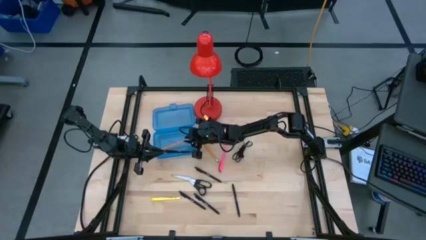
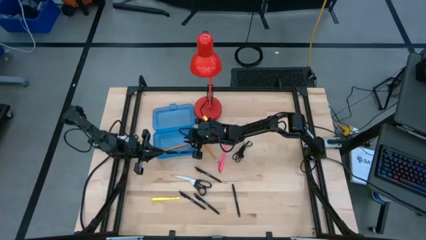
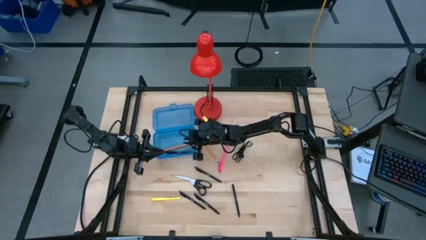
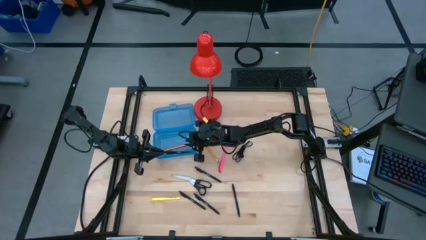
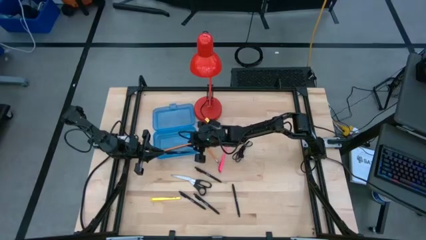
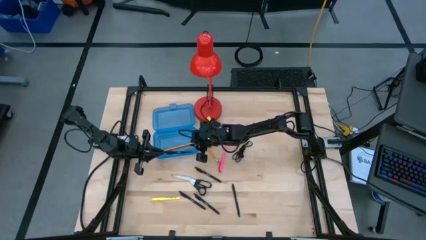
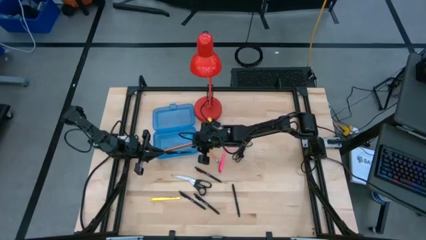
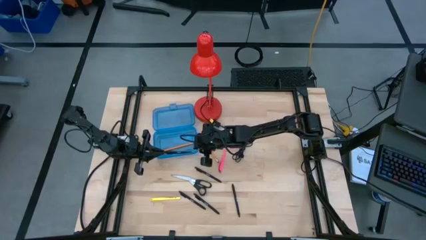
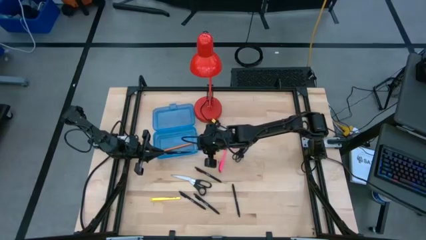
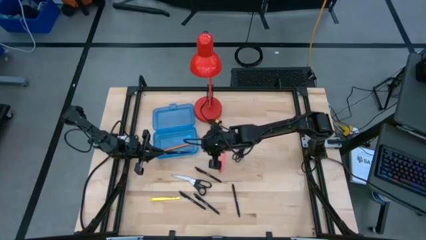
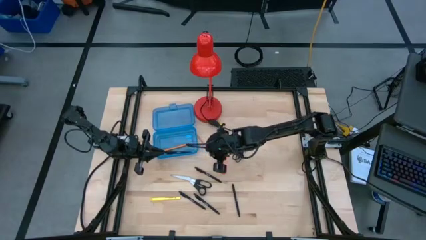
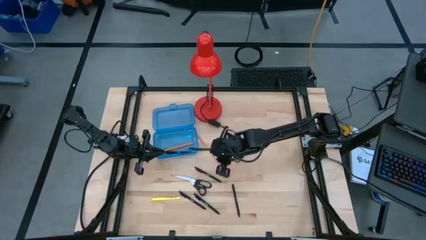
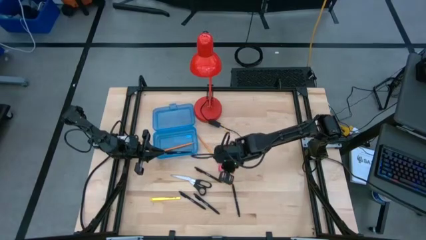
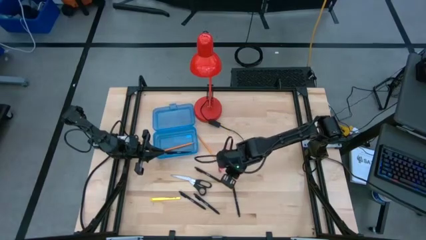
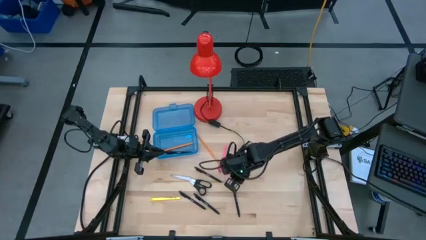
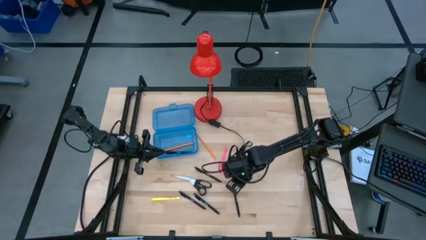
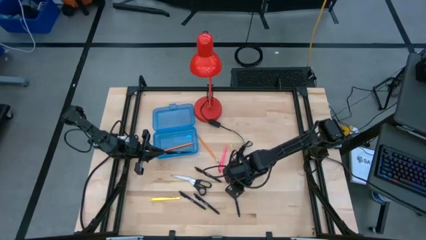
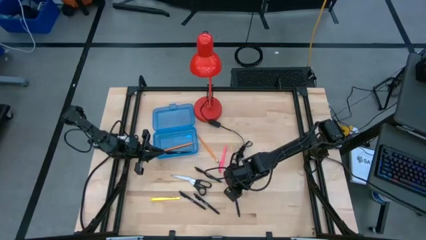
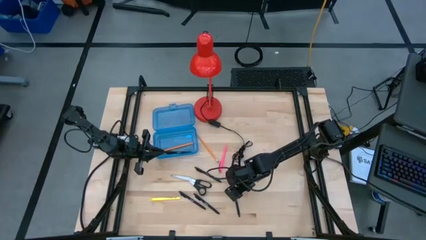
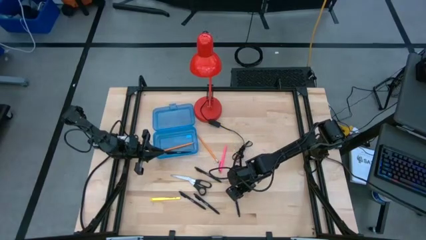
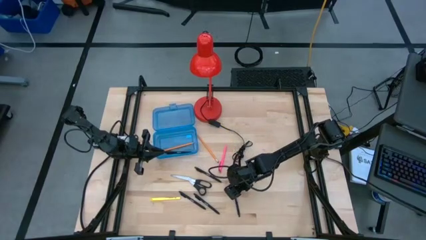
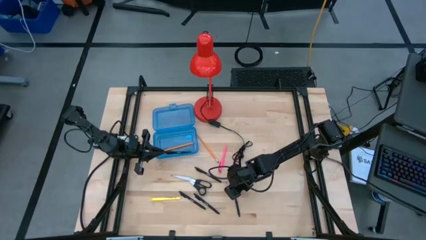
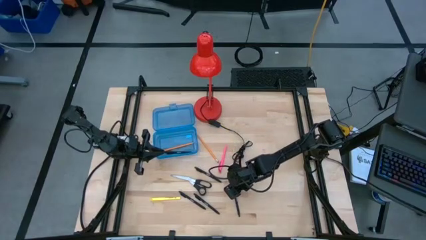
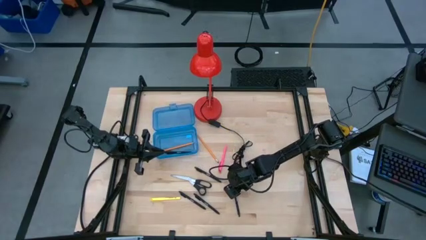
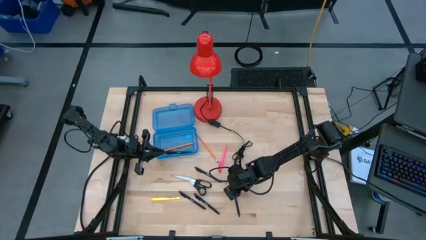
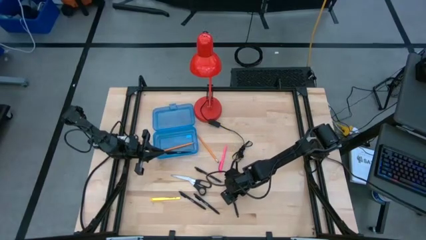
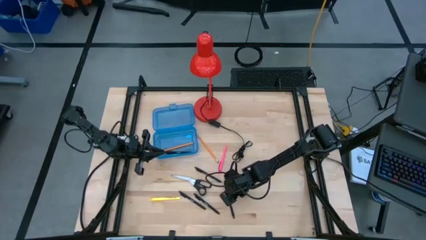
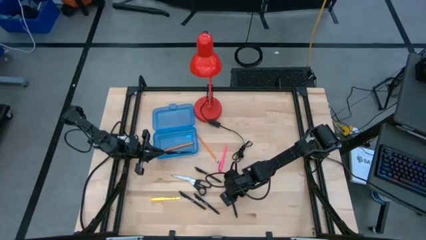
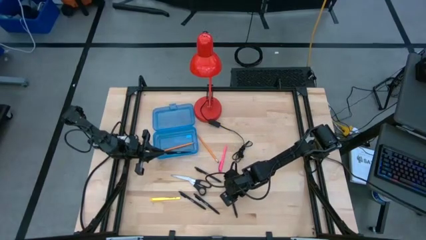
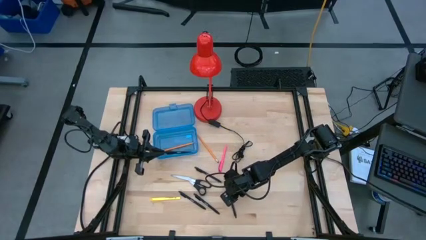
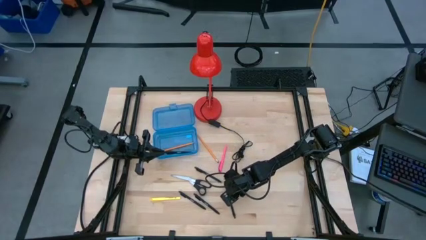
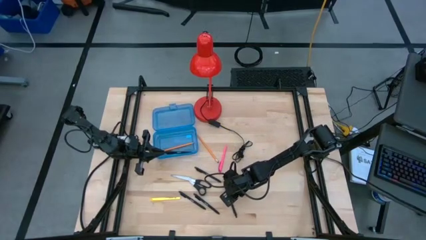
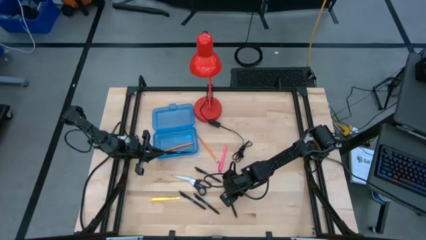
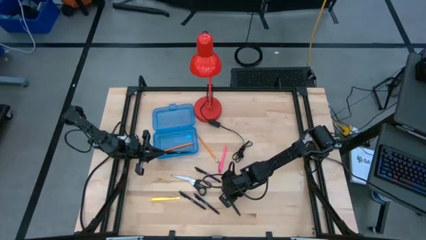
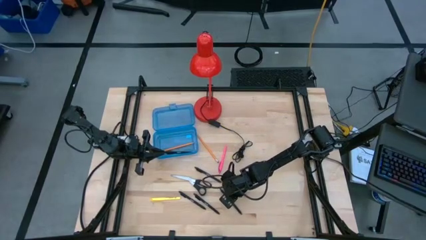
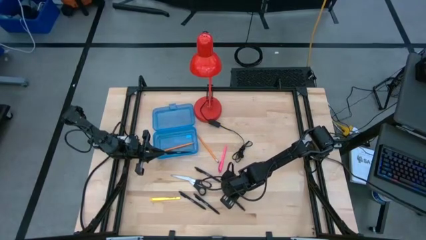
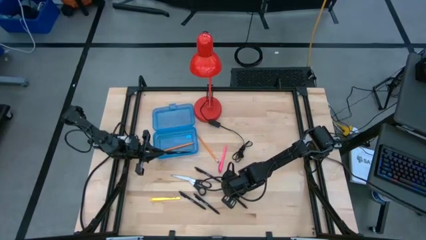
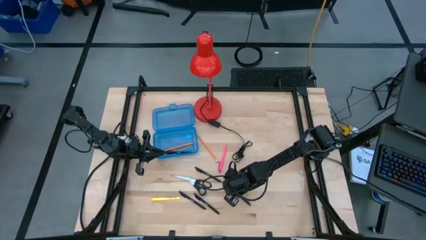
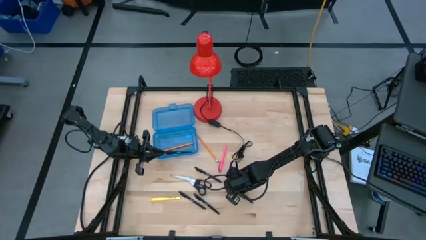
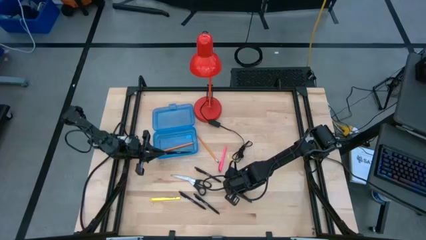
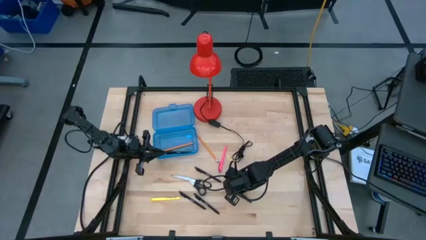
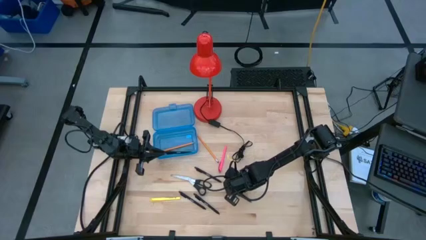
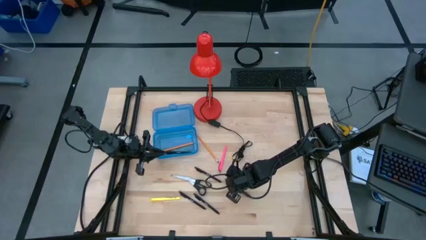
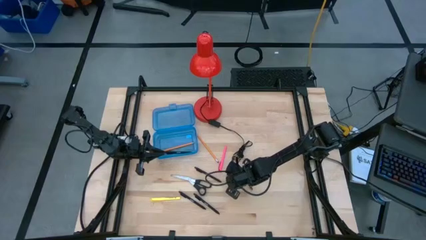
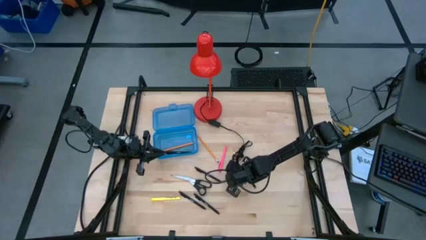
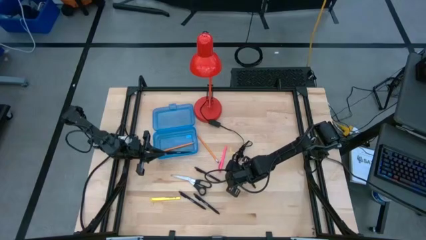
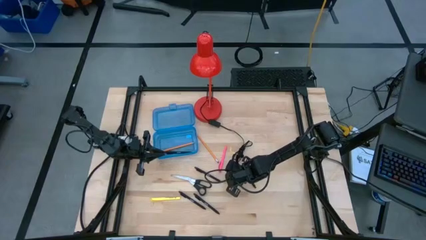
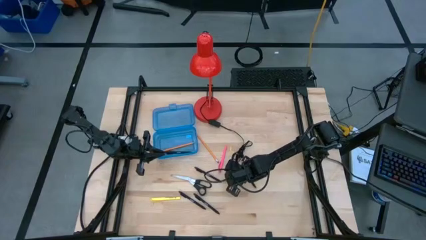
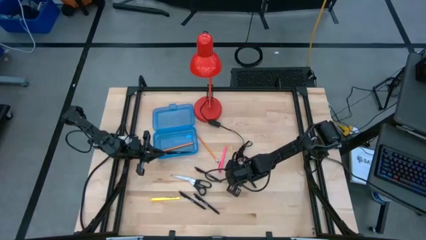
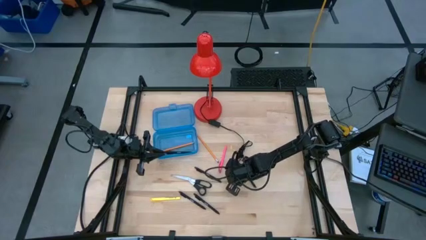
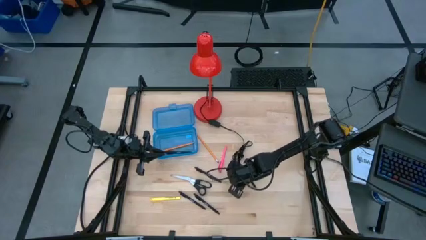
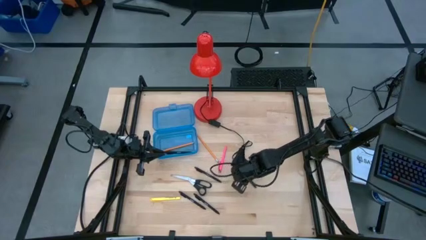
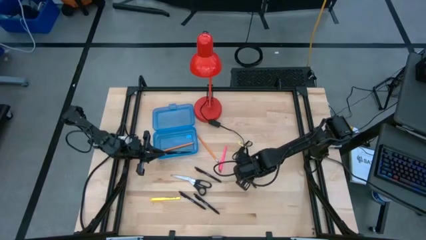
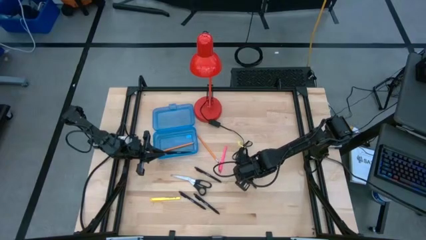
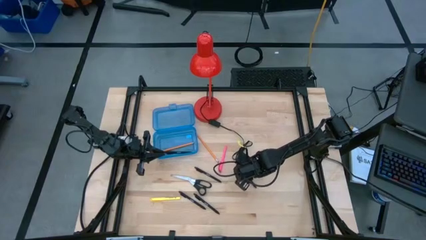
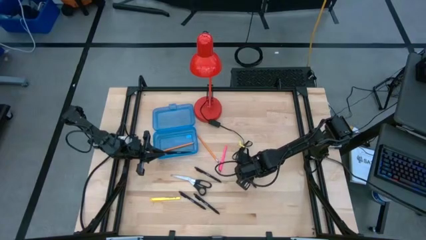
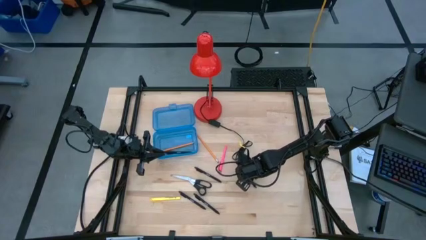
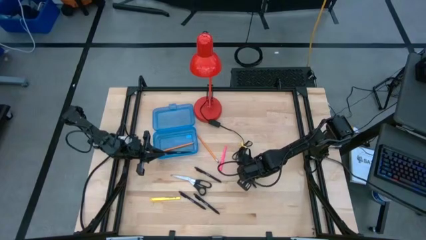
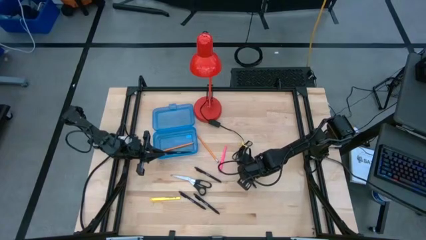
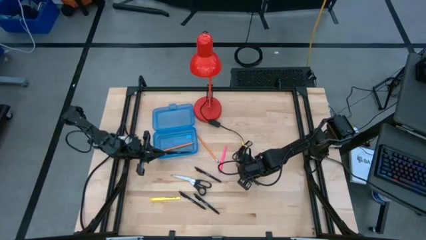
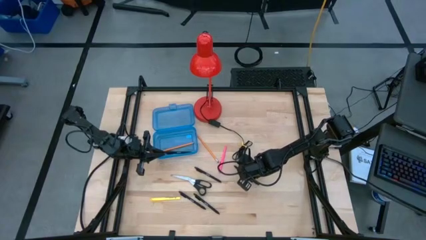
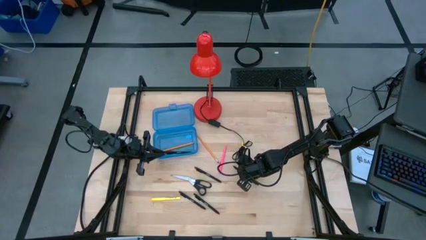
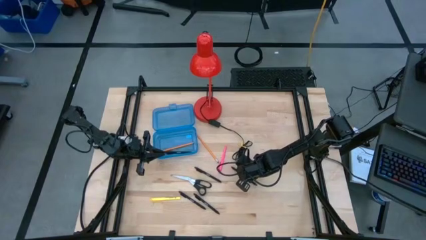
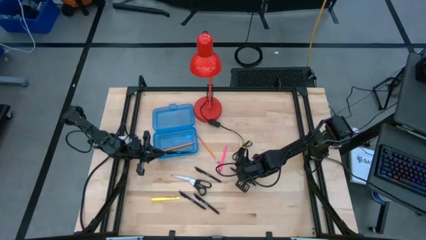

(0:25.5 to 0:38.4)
Task: Pick & place school supplies into a supply box
Put the black pen into the blue supply box
